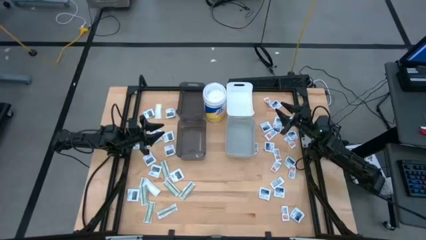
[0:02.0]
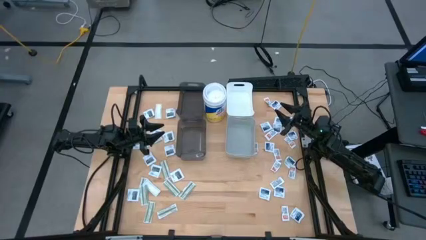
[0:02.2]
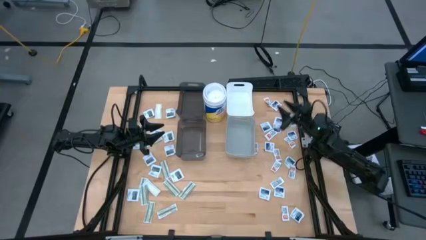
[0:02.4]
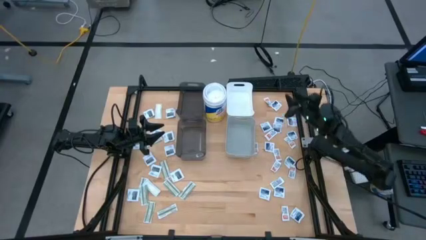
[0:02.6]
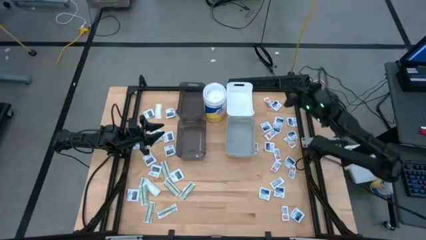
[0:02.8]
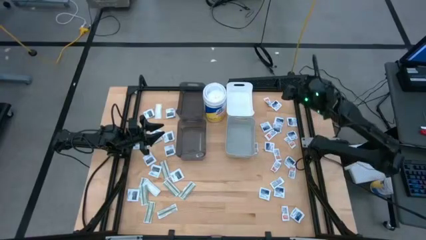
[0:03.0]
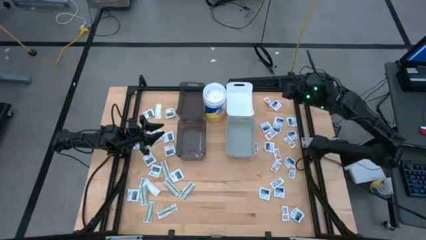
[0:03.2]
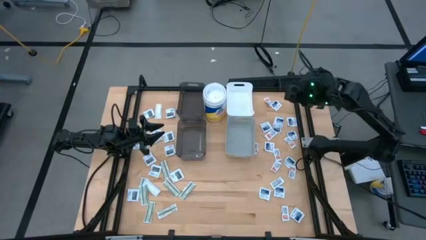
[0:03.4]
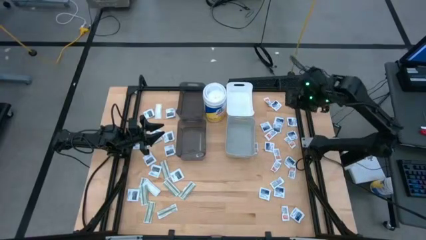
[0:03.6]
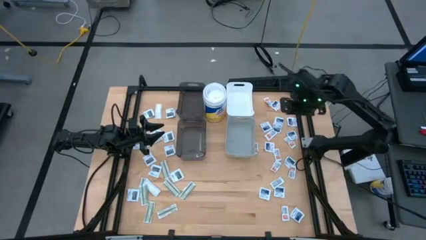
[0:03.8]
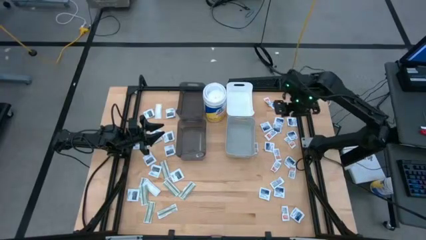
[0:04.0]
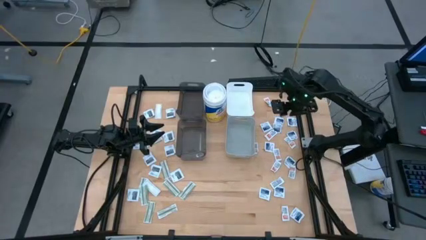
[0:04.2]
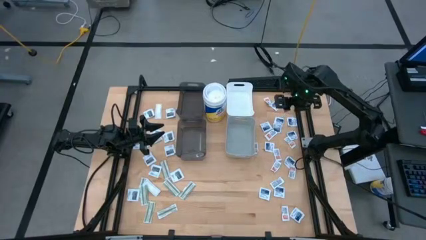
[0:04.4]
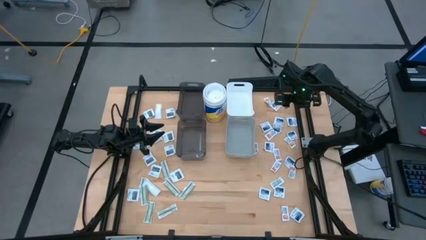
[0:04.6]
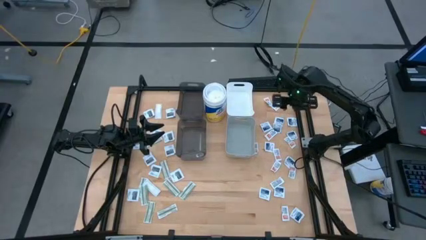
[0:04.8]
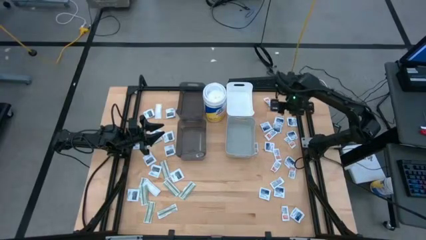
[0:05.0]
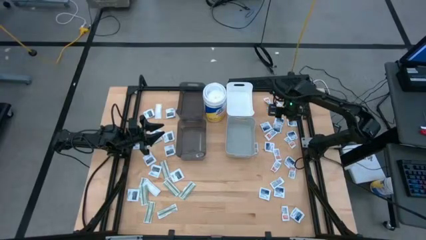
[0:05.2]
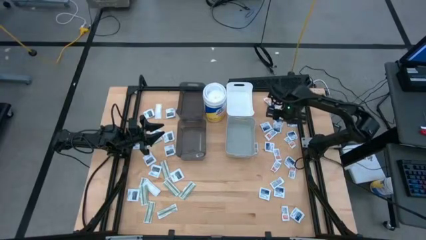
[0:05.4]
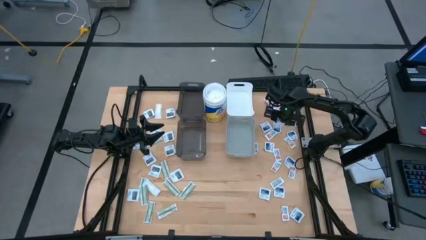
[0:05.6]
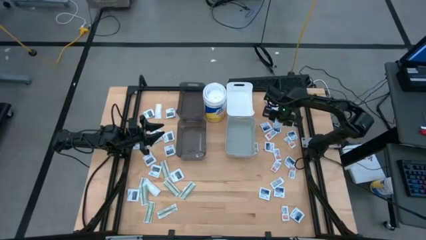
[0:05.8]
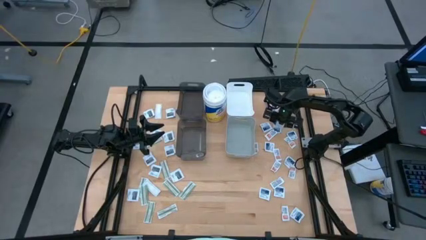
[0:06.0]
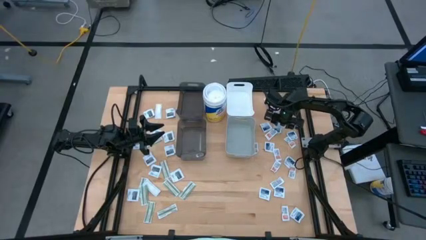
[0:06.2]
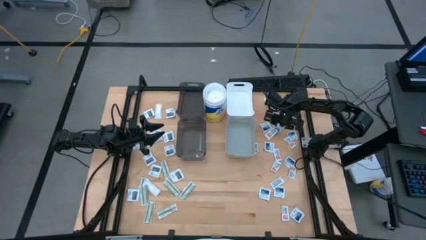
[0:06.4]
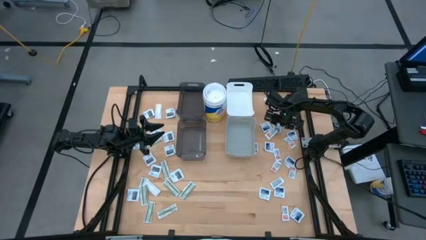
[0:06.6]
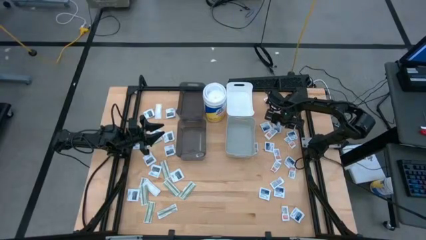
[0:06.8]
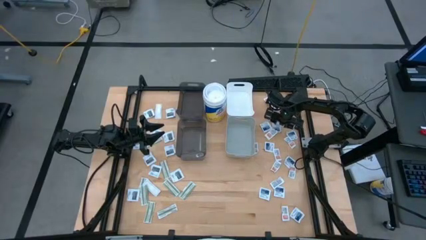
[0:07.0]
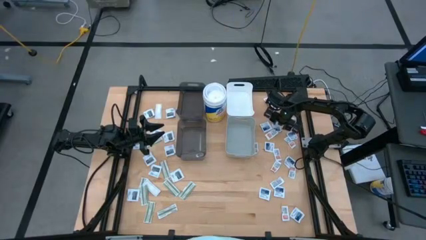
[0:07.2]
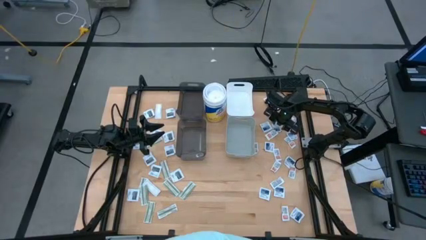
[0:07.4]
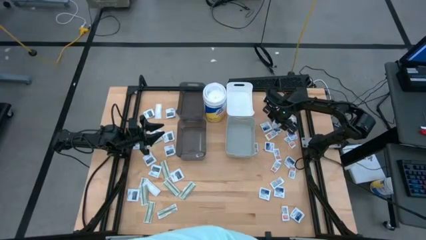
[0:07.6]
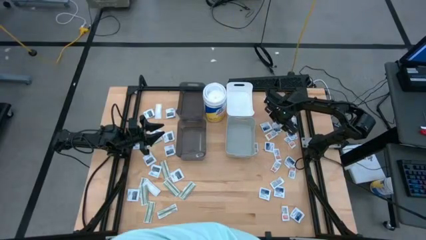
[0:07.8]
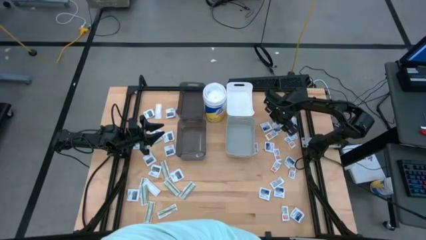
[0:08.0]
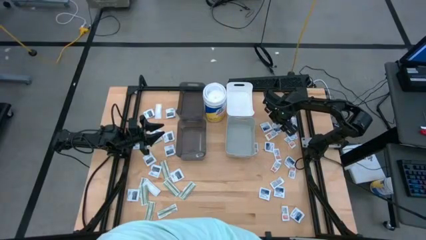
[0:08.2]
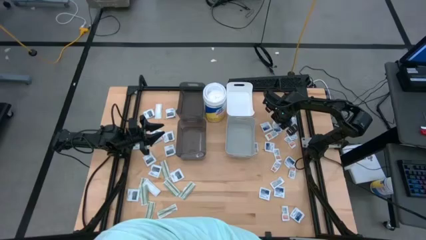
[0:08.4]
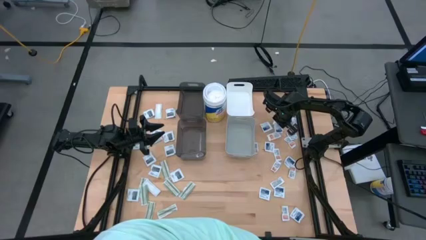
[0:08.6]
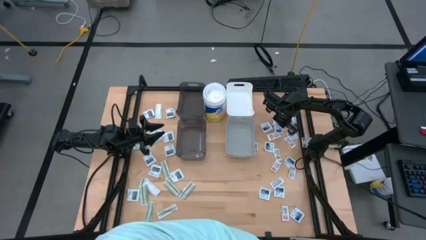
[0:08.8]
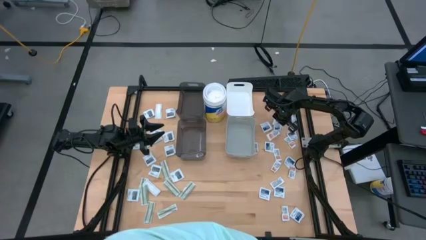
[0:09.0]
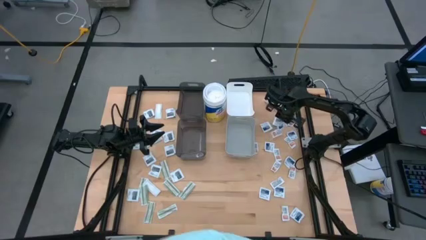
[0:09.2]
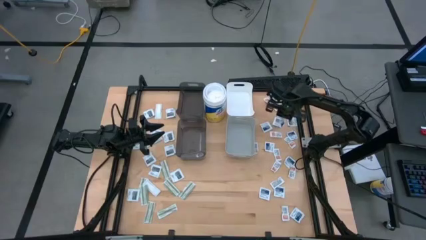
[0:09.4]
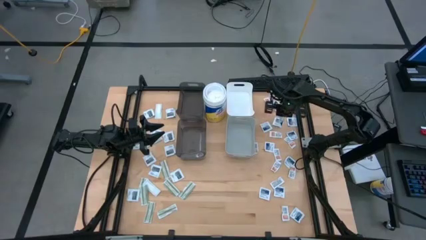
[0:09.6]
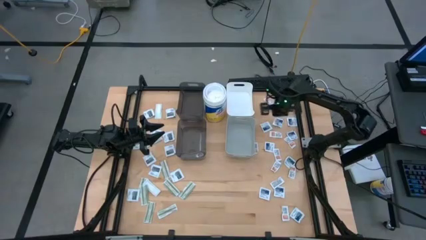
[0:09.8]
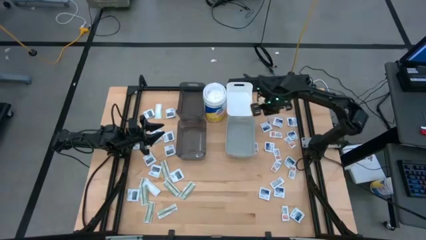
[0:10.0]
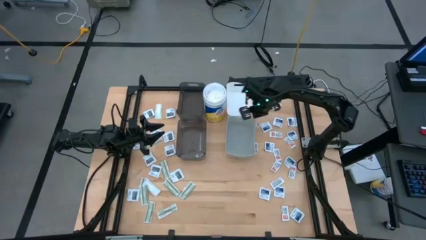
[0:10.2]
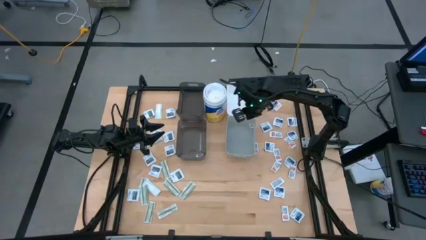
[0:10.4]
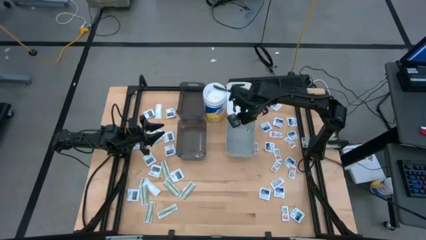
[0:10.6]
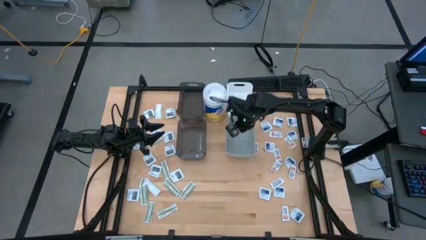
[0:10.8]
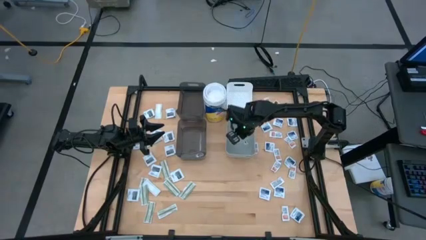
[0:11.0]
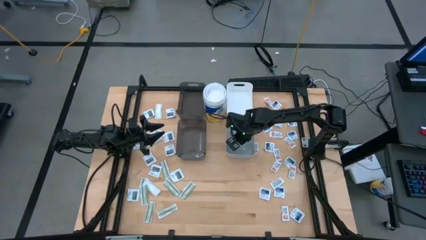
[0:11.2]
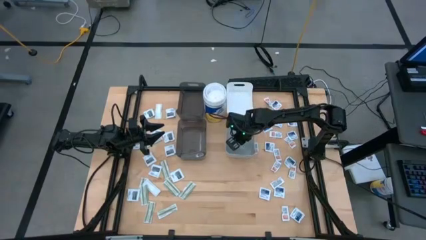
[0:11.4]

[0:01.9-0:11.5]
Task: Pick & Place First Aid Supplies
Put the alcohol pad into the gray bin

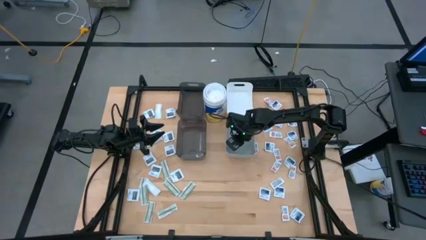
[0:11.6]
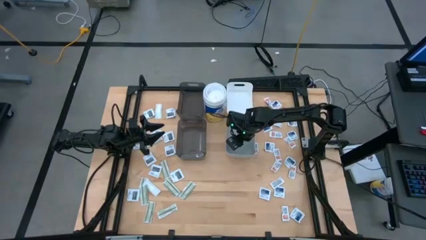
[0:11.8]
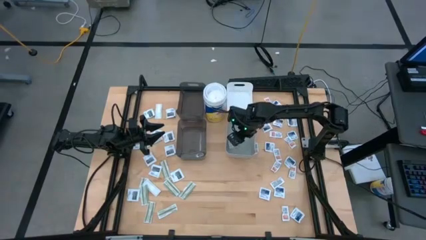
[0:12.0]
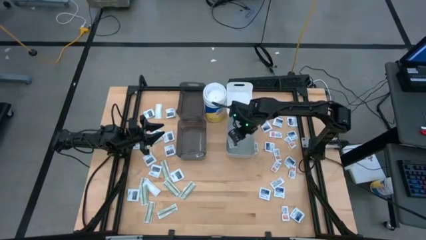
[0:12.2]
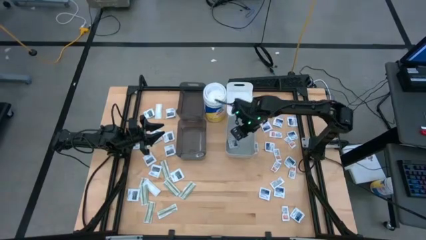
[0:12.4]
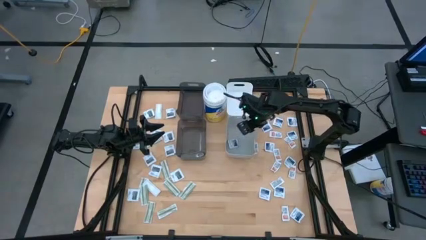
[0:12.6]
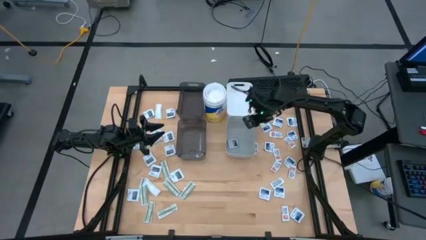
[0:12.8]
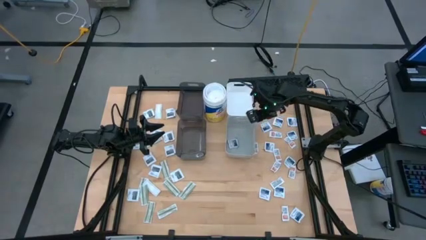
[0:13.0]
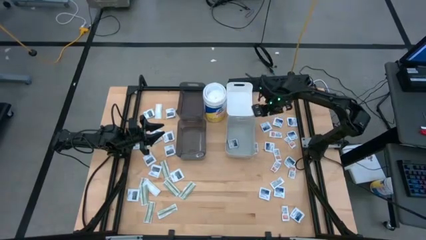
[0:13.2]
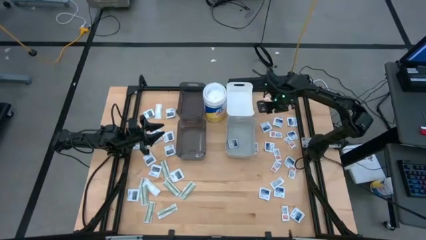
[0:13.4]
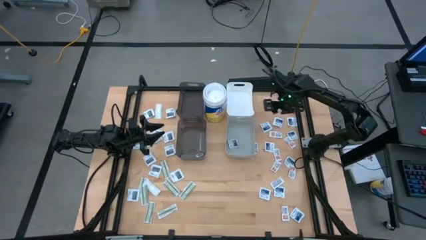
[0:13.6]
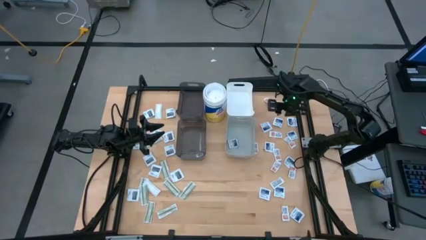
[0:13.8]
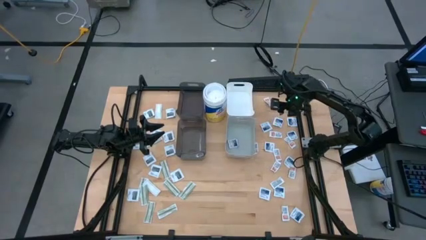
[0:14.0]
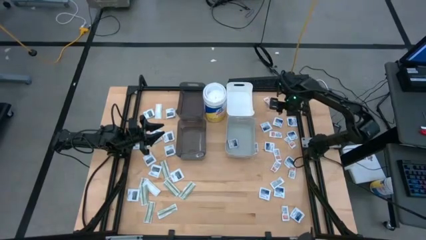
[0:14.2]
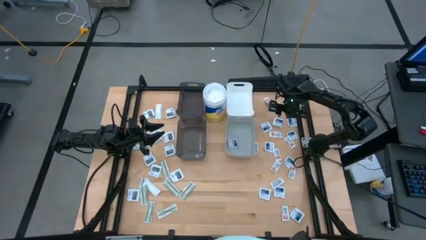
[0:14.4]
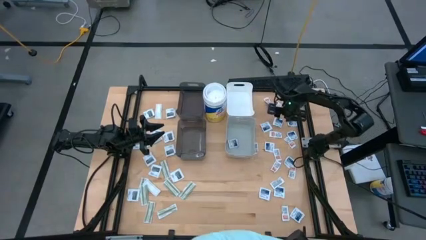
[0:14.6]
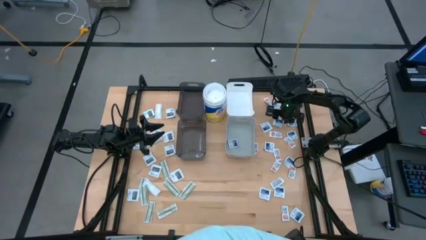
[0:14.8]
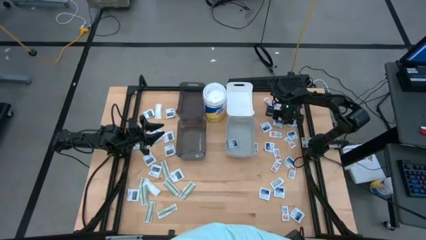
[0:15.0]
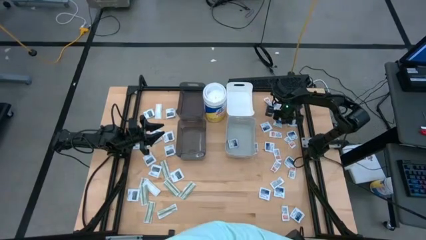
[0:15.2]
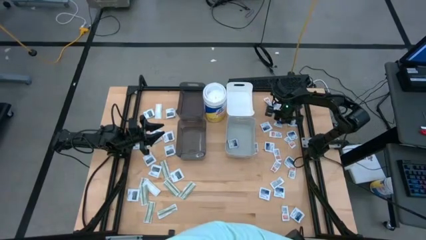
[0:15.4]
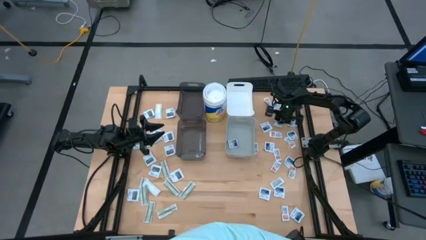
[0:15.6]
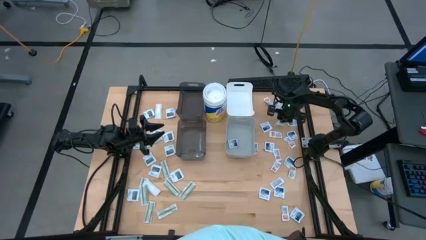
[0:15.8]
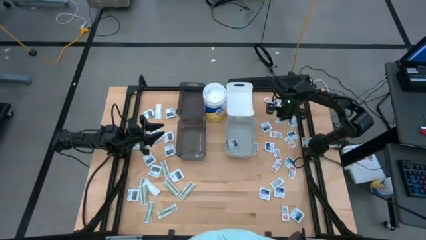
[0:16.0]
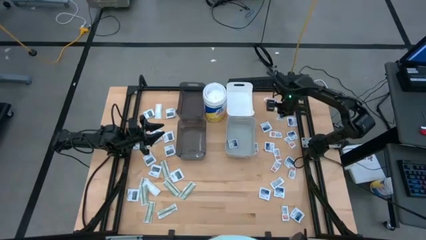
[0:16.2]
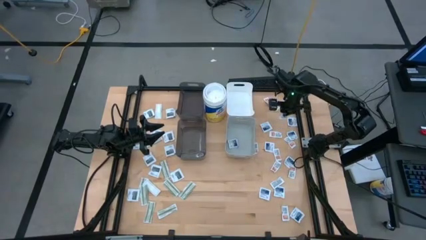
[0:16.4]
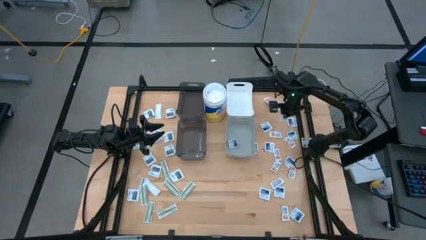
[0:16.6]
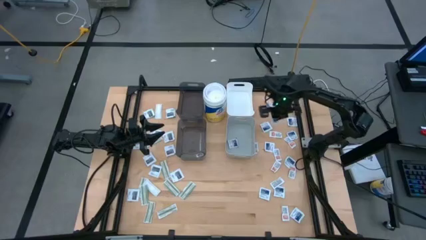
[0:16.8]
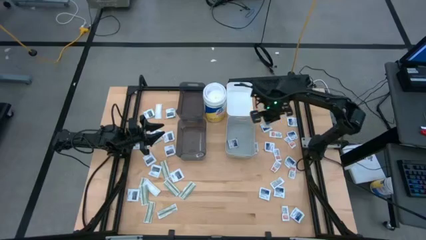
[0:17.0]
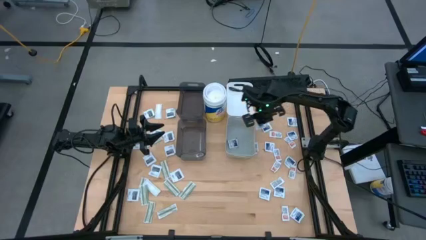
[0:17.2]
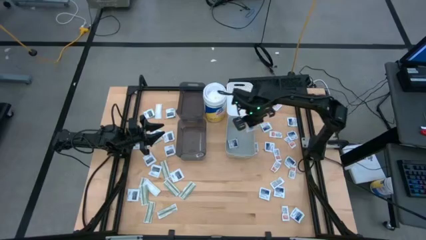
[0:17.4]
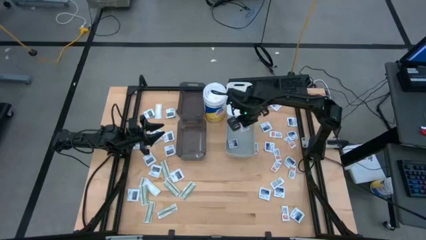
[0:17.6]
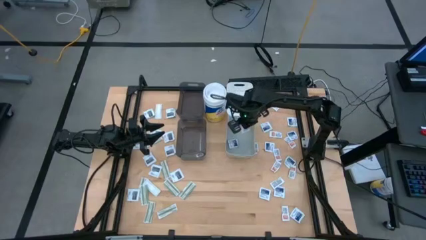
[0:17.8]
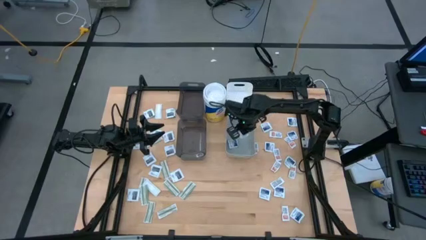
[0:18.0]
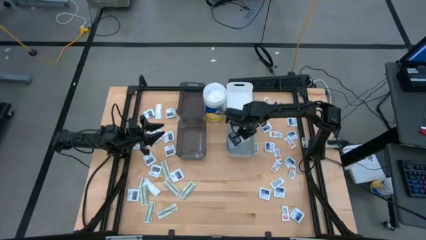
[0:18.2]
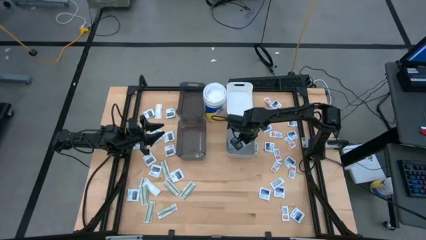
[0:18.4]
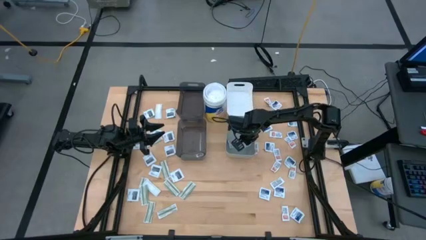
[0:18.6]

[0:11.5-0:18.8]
Put the alcohol pad into the gray bin
